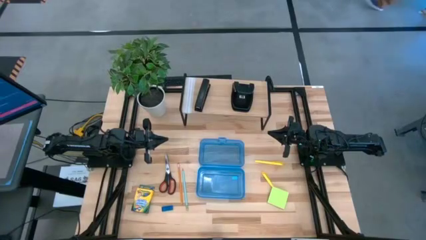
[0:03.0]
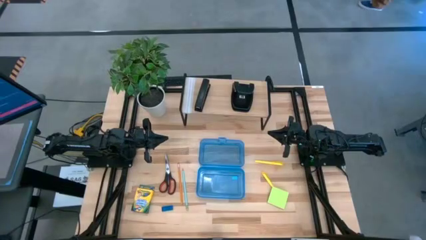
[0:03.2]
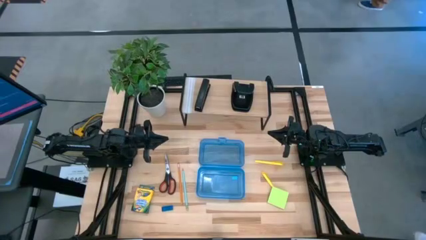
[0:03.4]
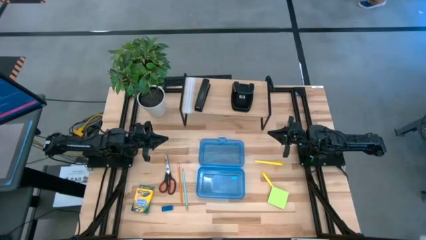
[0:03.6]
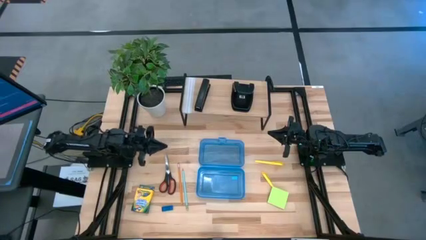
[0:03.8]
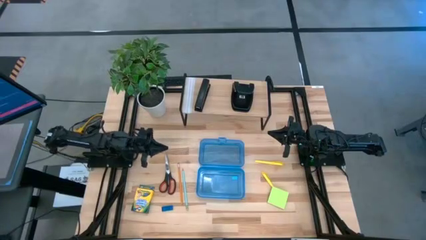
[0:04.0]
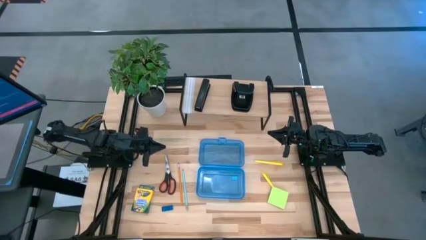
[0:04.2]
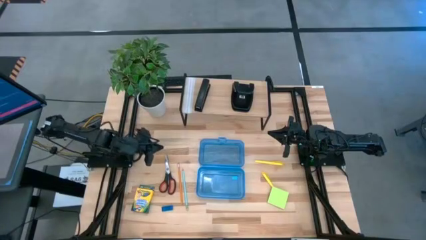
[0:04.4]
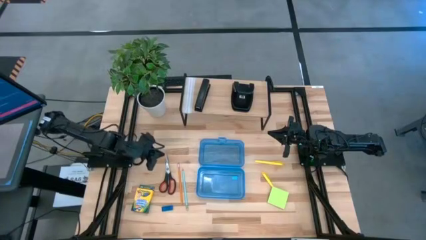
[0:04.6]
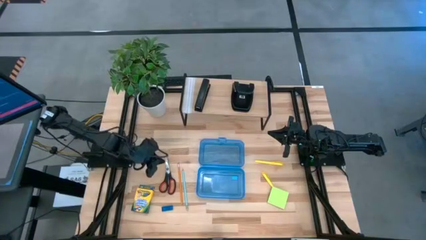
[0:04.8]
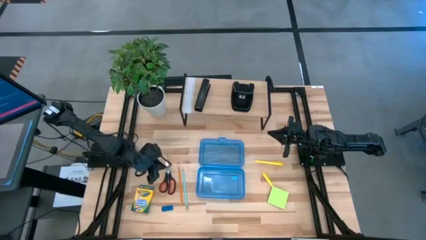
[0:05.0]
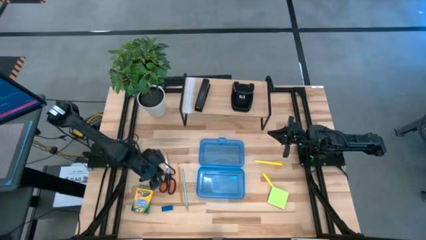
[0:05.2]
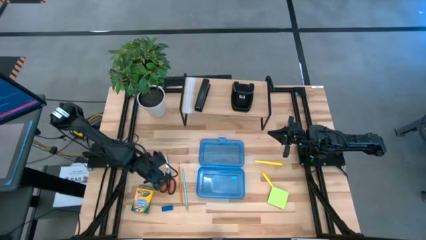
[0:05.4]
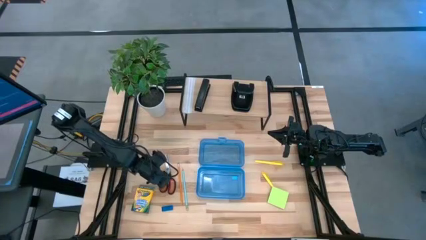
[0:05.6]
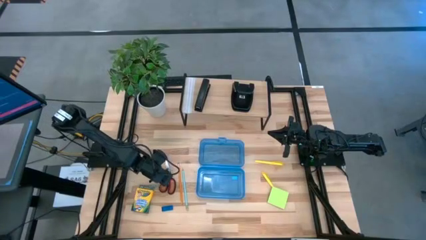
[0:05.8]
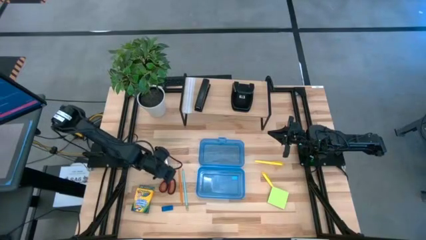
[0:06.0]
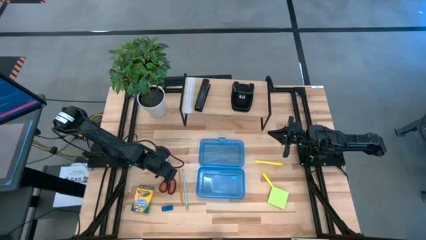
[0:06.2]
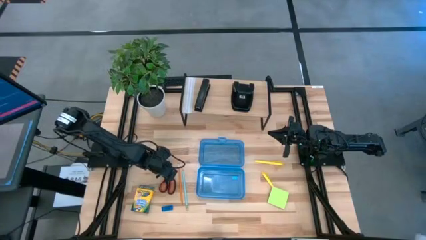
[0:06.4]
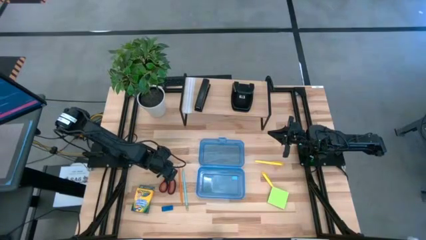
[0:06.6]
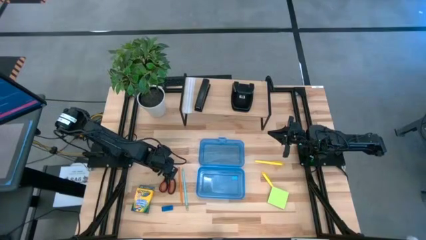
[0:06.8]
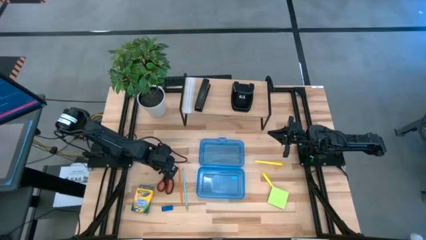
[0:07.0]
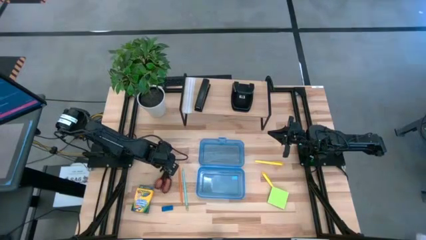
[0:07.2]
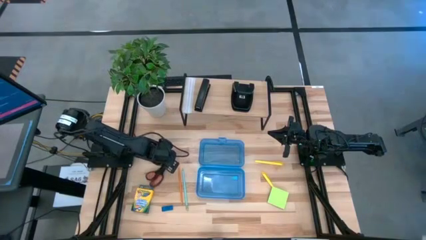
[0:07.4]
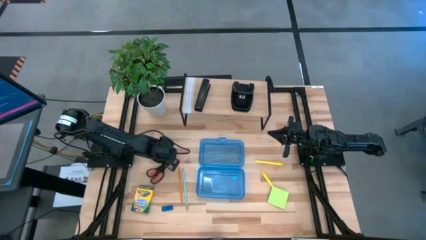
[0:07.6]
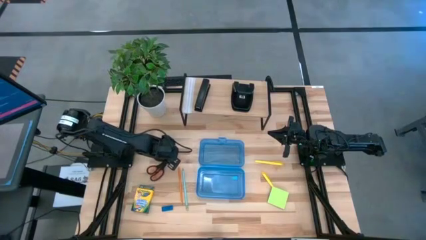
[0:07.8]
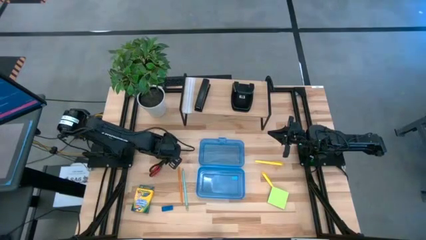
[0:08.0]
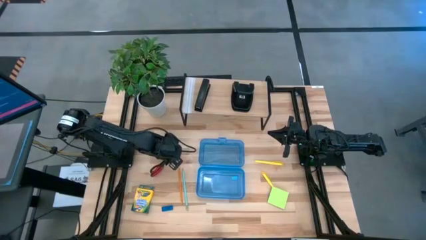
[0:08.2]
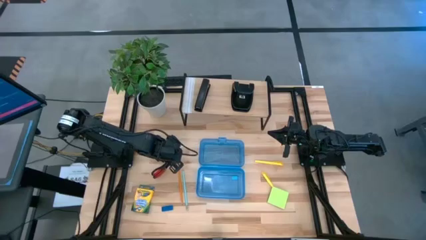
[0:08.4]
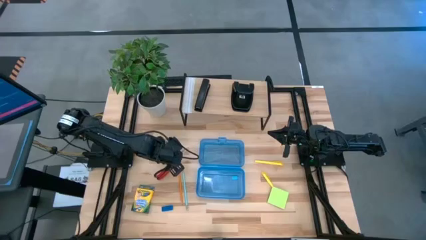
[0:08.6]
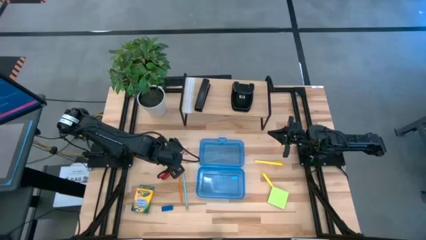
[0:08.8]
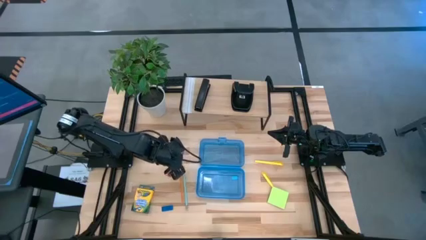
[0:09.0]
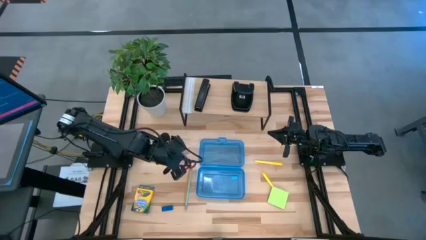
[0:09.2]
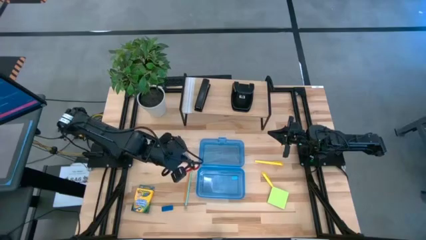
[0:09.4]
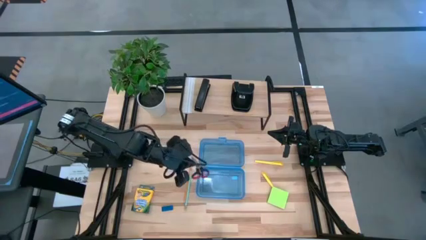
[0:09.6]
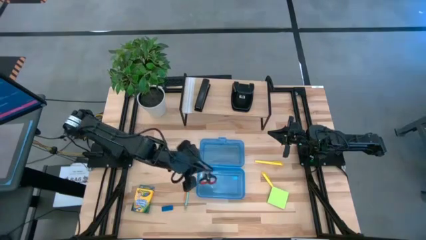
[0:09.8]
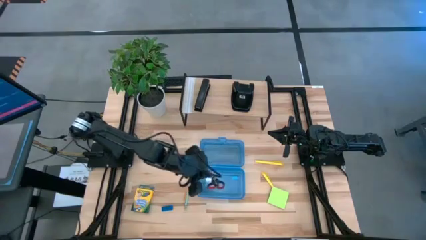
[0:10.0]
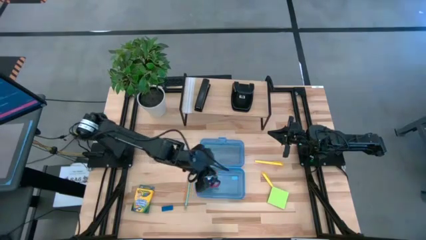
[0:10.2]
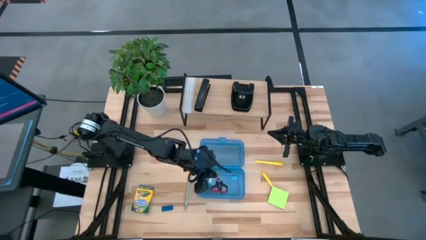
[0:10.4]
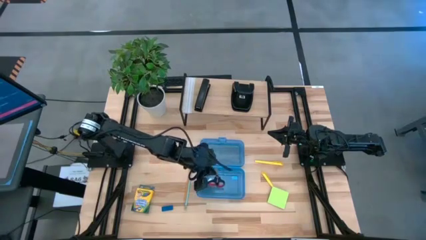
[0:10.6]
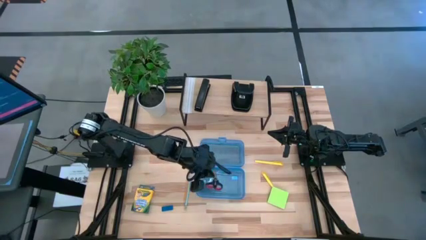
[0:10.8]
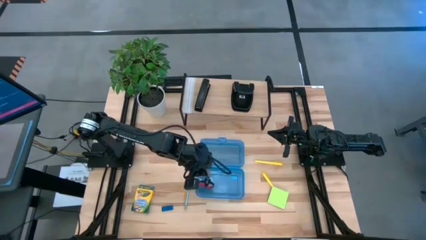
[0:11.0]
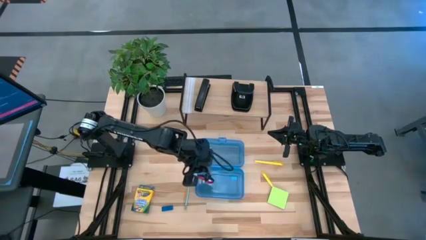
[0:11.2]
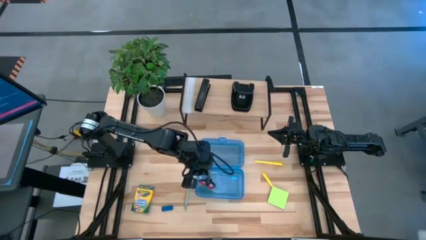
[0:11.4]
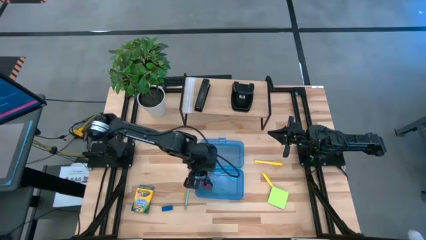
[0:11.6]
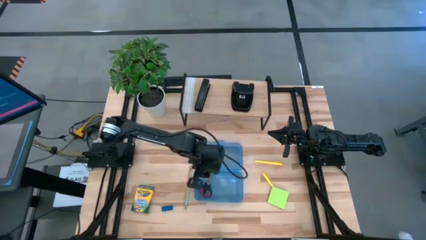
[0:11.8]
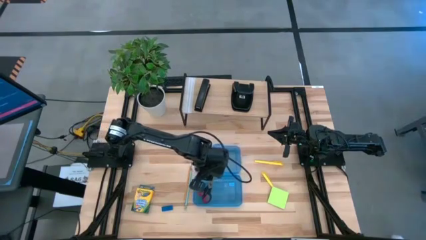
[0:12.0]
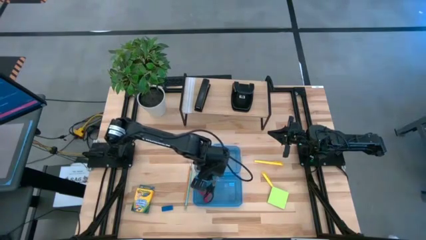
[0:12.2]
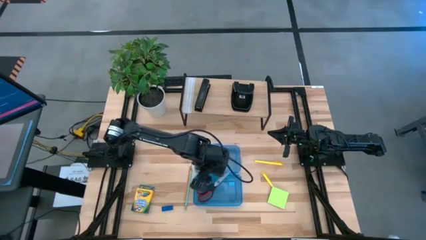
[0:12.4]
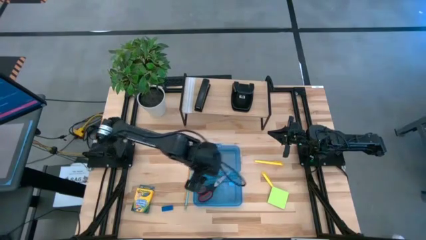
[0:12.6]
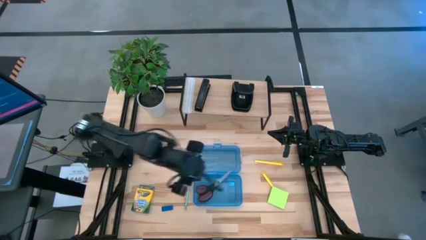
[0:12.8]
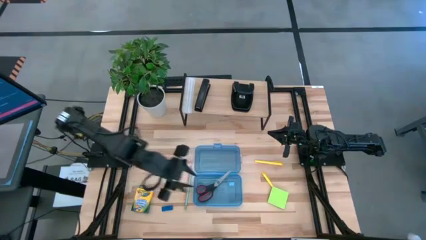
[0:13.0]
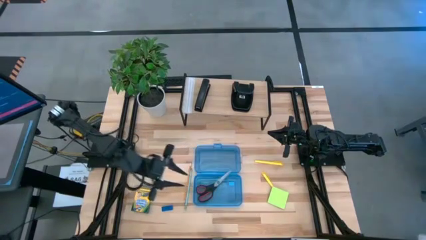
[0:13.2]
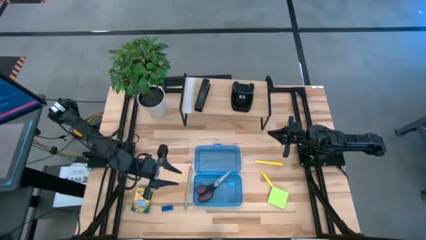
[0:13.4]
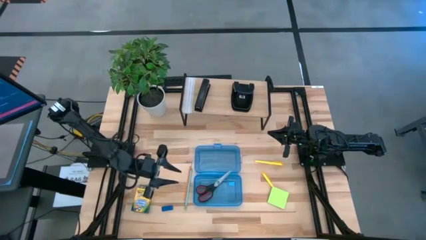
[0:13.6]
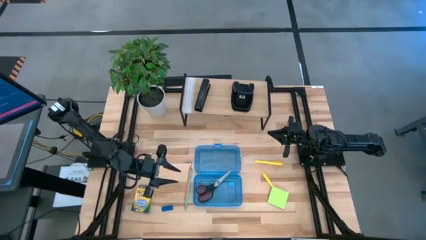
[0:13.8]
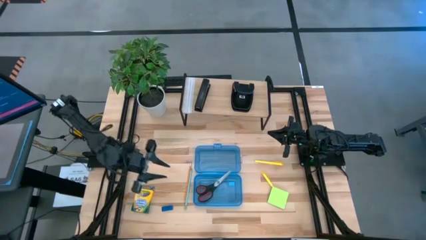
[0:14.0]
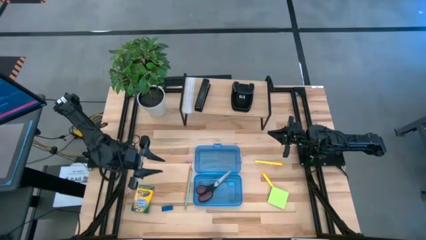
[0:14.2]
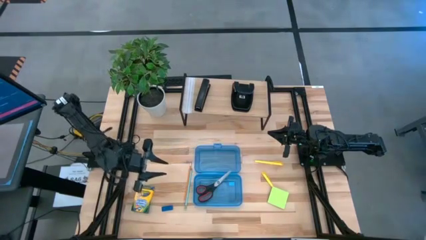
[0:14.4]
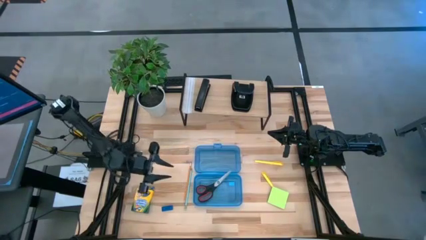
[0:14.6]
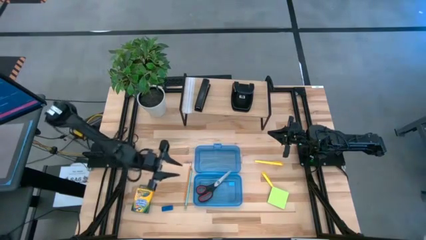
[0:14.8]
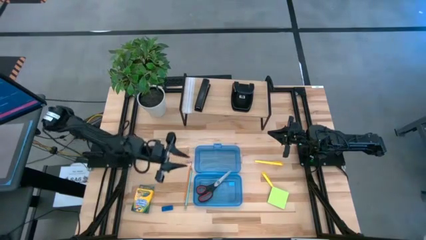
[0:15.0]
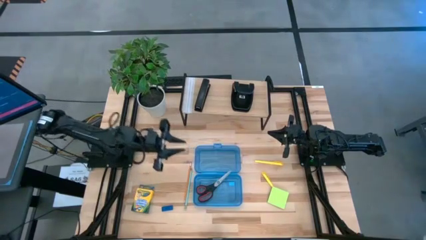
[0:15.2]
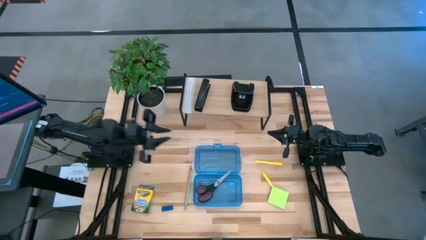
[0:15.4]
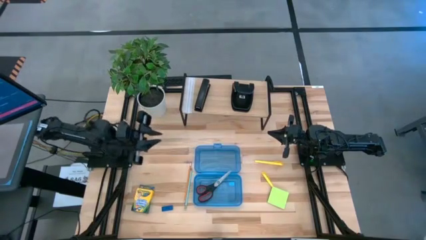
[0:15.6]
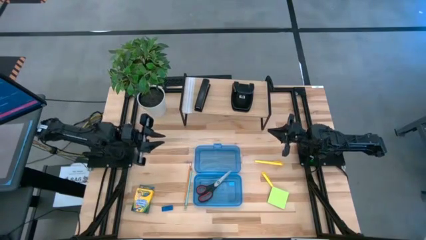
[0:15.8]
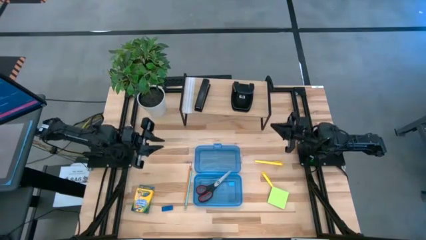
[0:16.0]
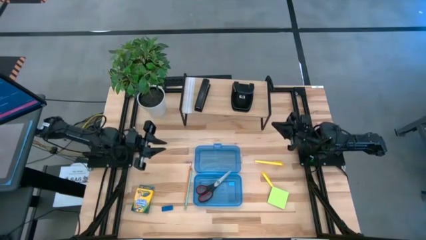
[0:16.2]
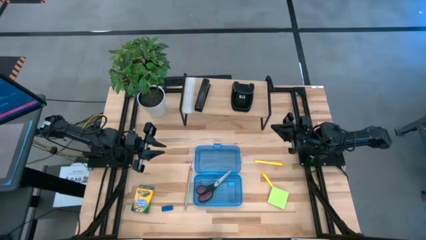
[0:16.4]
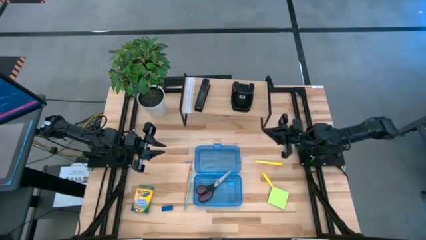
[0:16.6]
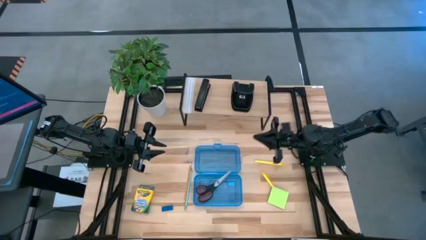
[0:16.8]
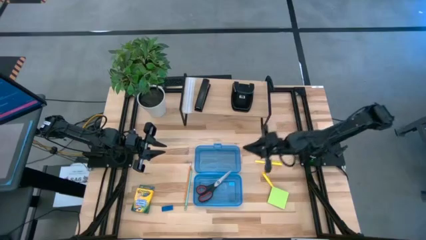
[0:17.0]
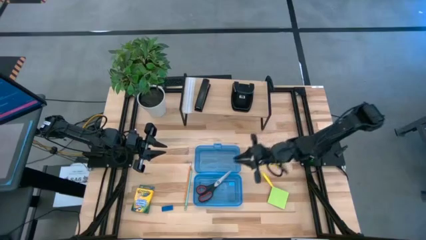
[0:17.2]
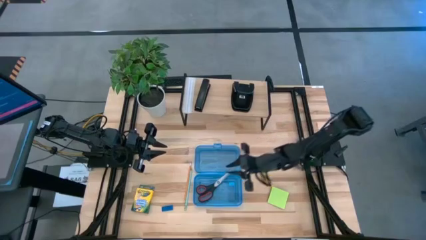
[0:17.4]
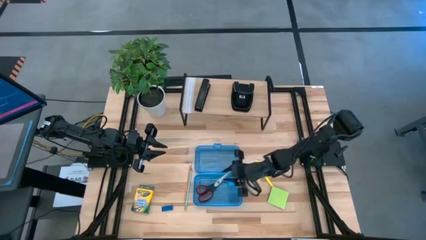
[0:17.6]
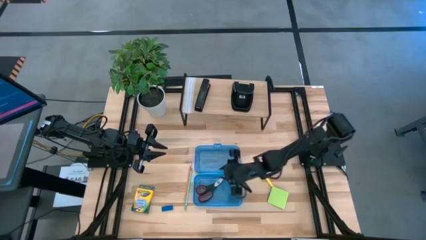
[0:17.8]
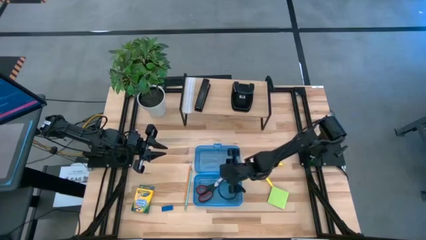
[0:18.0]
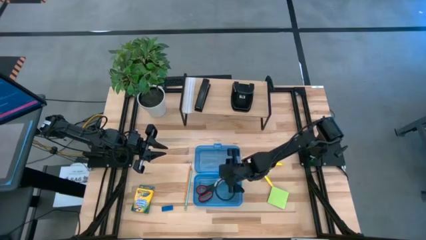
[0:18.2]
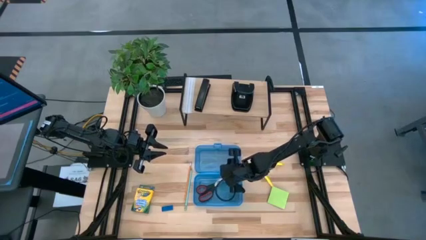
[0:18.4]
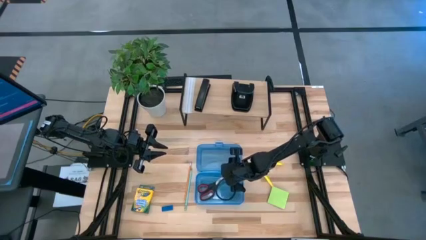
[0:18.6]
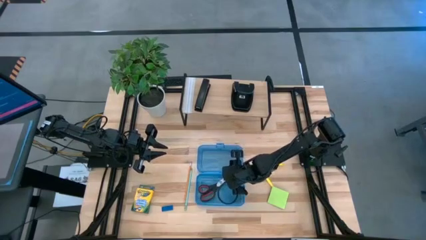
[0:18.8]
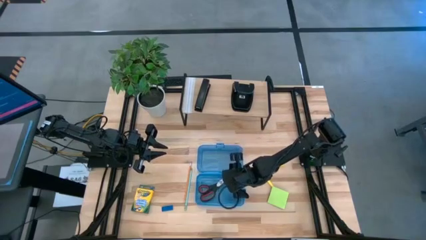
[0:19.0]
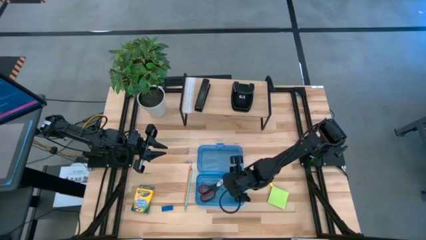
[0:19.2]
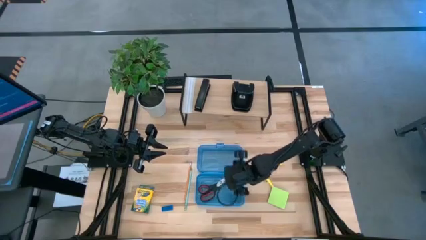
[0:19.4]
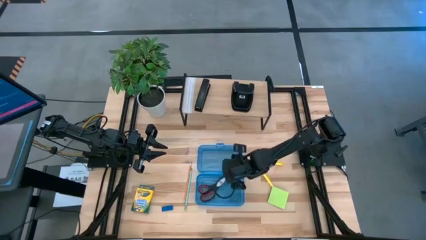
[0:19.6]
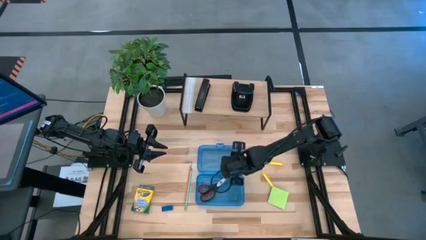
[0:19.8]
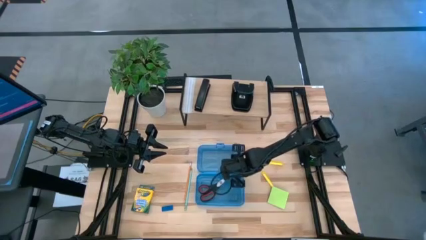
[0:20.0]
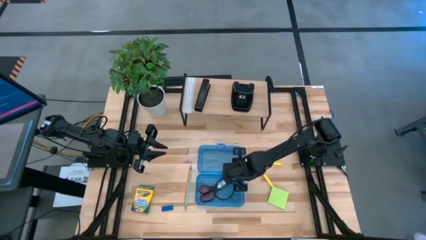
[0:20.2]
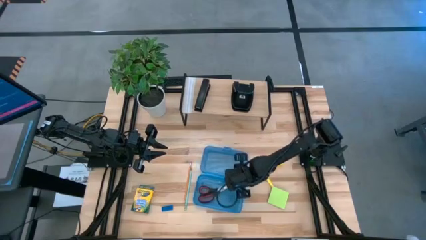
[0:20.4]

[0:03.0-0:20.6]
Task: Pack school essentials
Put the black scissors into the blue supply box

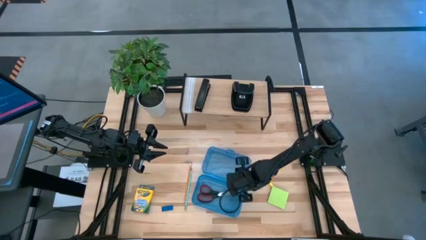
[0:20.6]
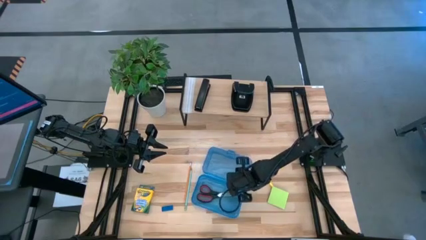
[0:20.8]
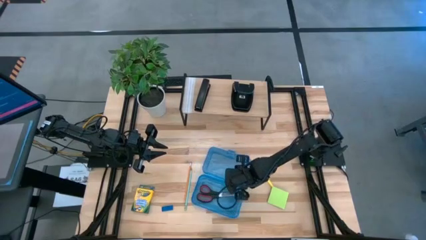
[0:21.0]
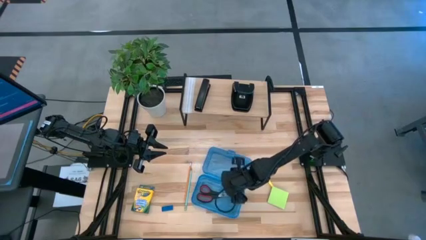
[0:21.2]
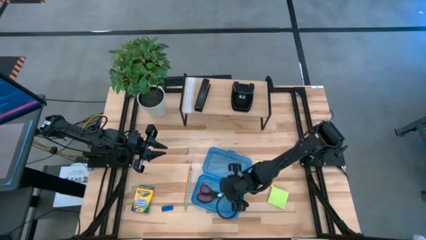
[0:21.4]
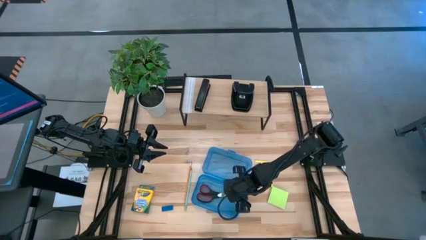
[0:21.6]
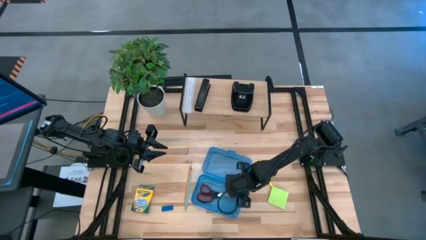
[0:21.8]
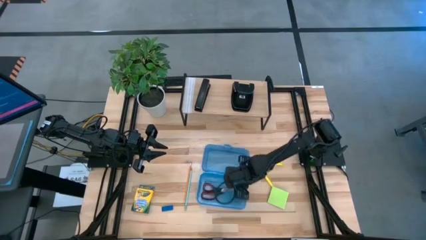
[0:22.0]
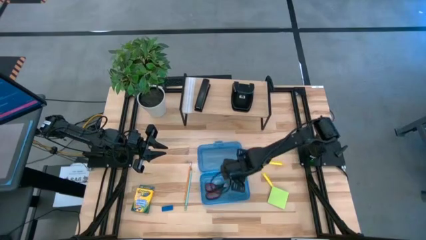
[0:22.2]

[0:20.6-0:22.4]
Adjust the blue supply box
